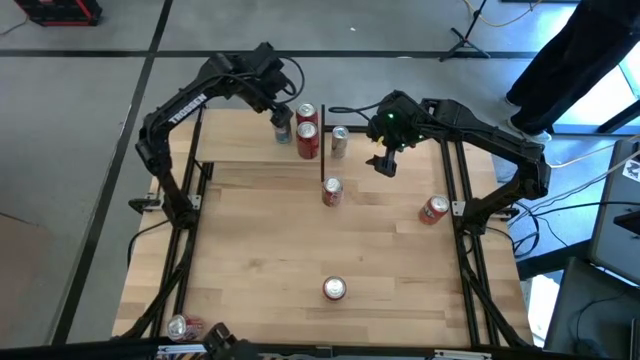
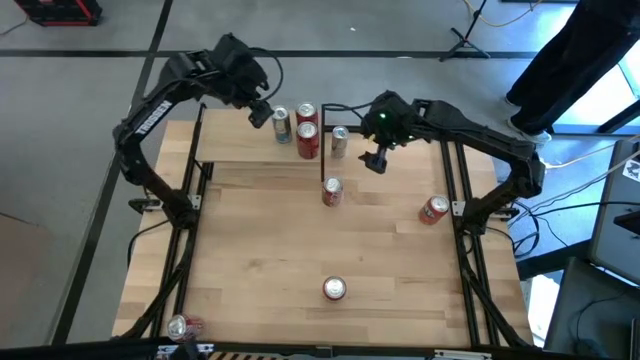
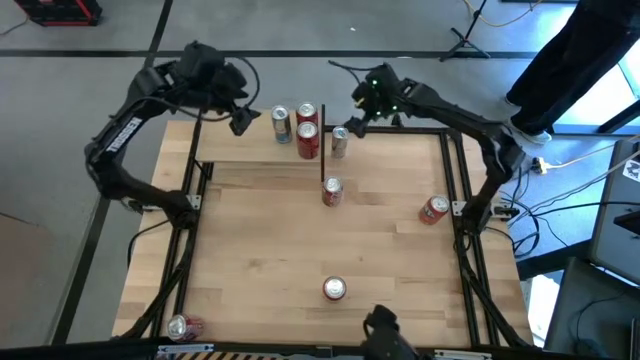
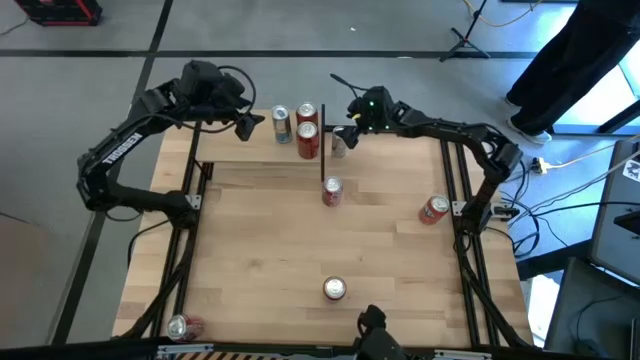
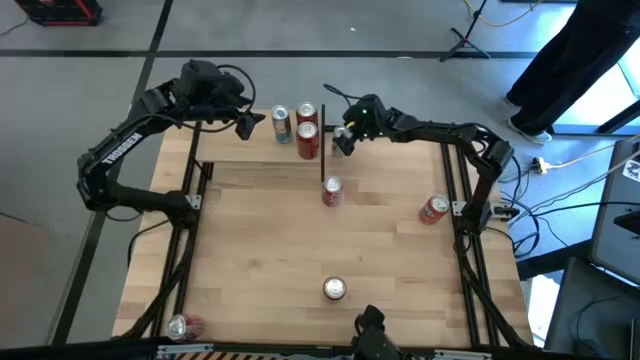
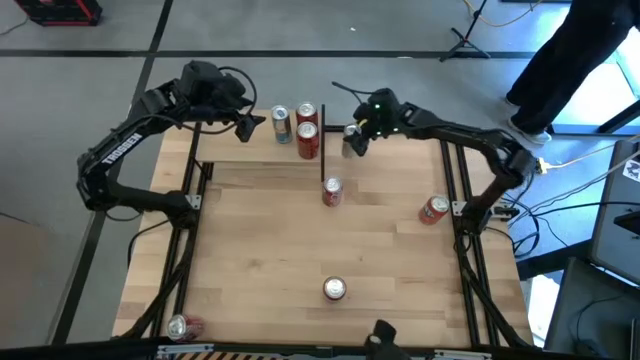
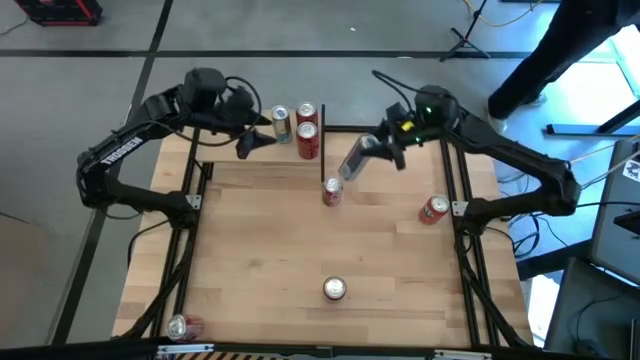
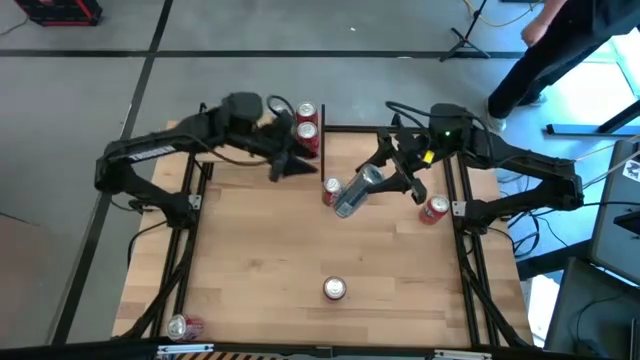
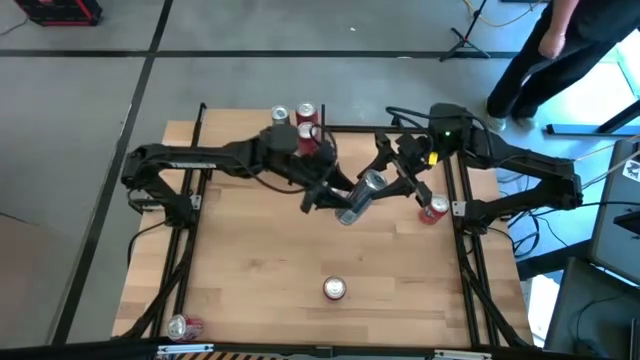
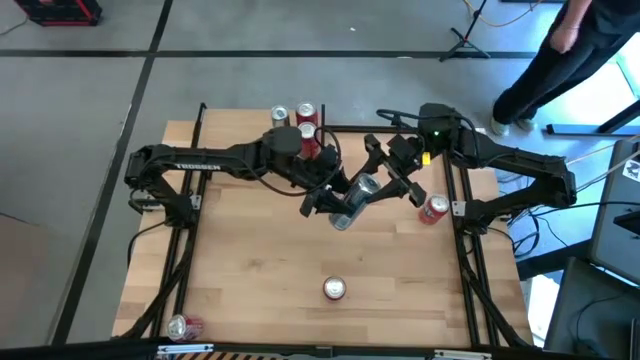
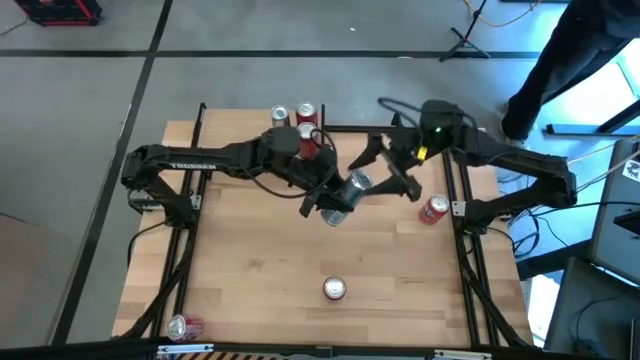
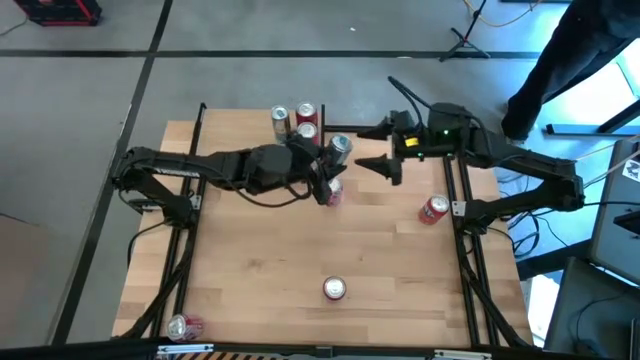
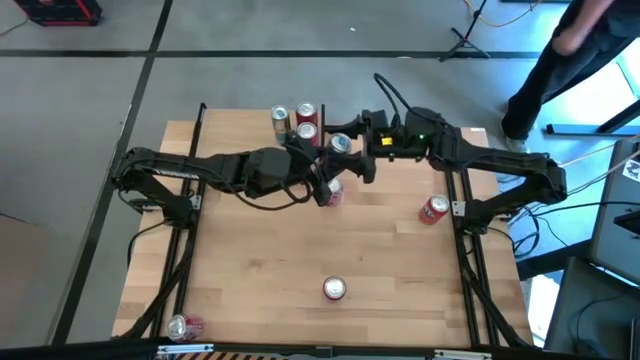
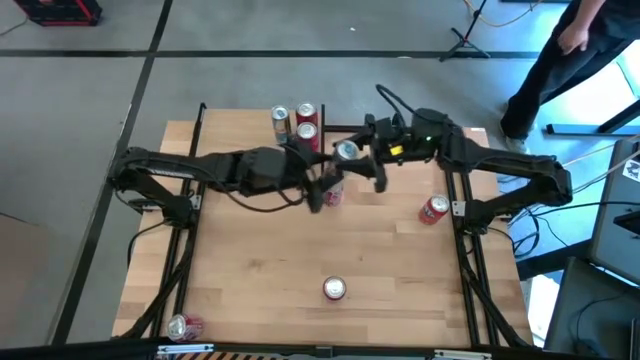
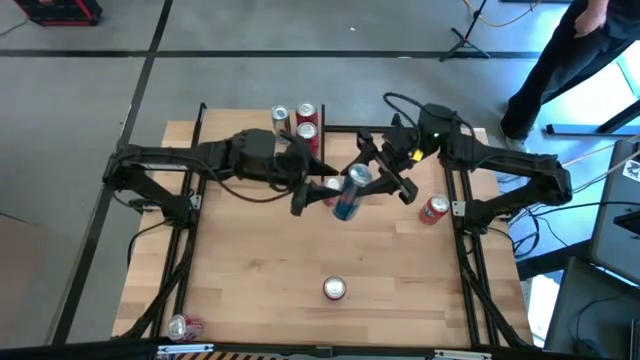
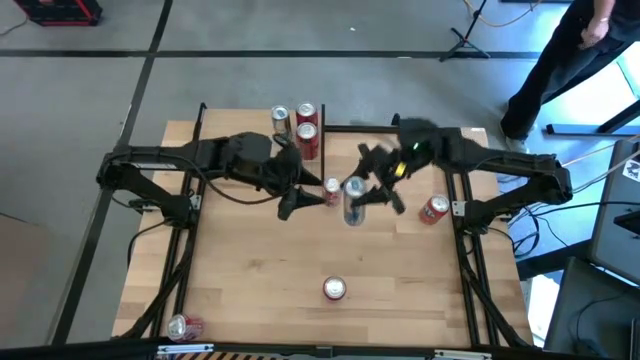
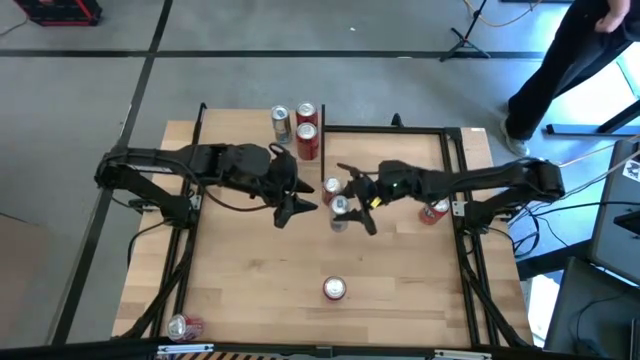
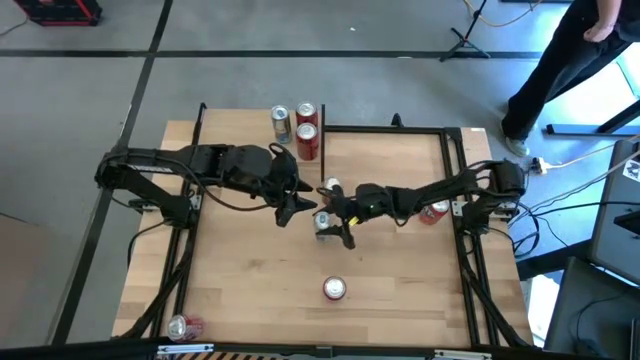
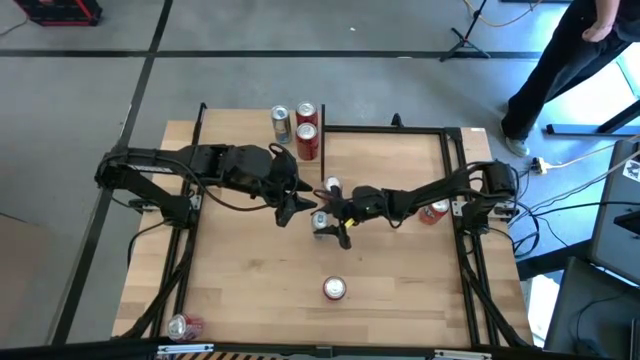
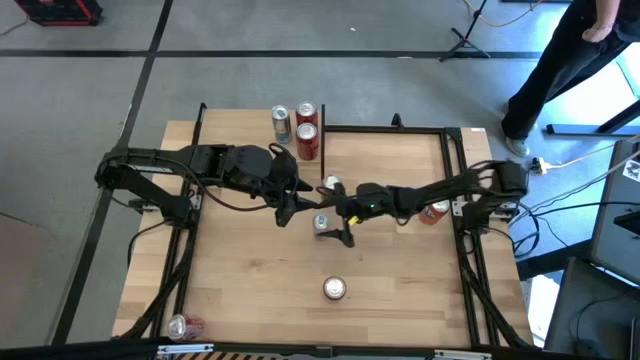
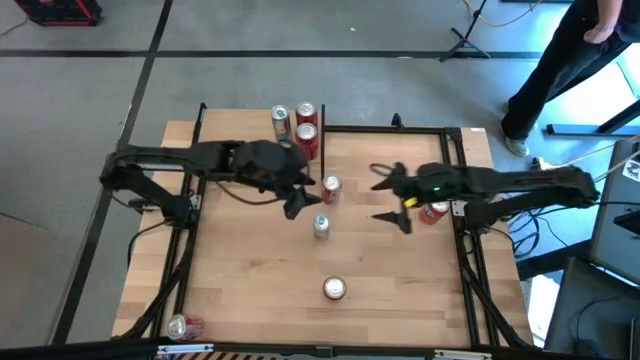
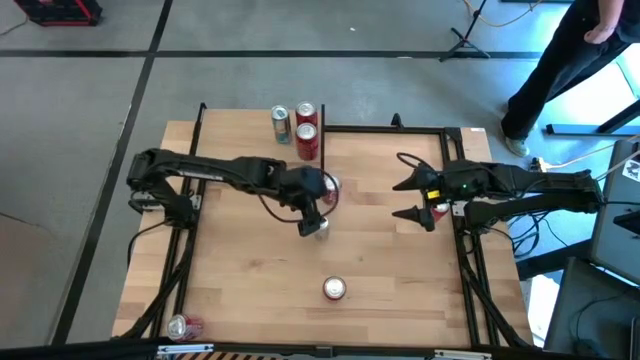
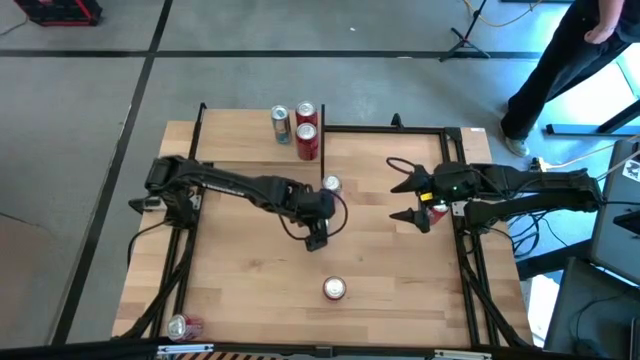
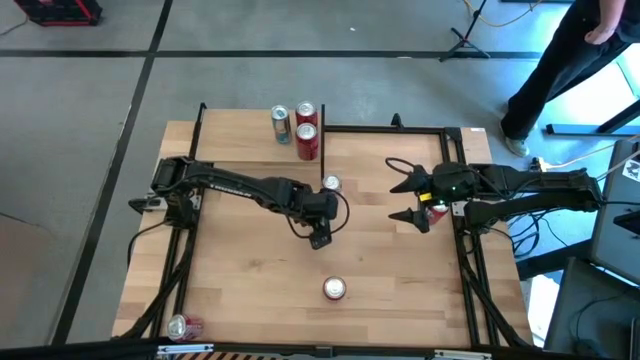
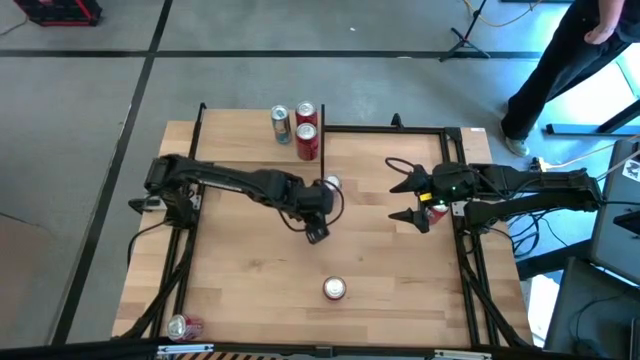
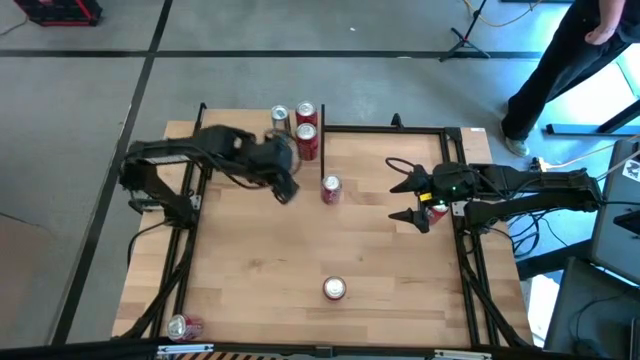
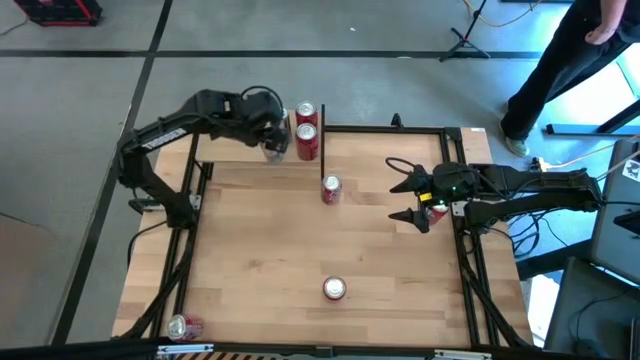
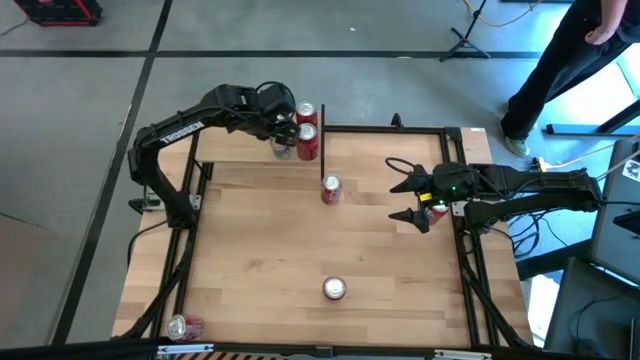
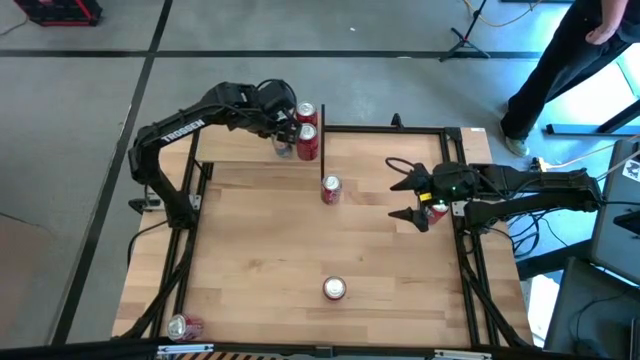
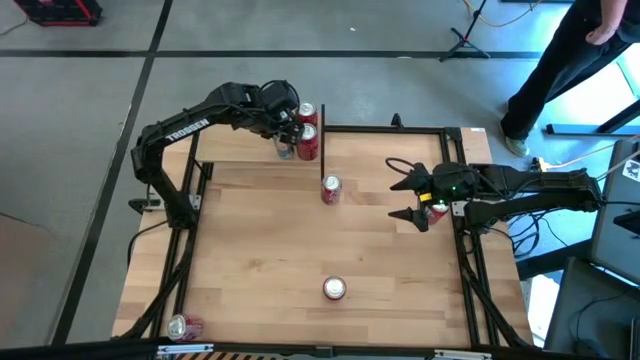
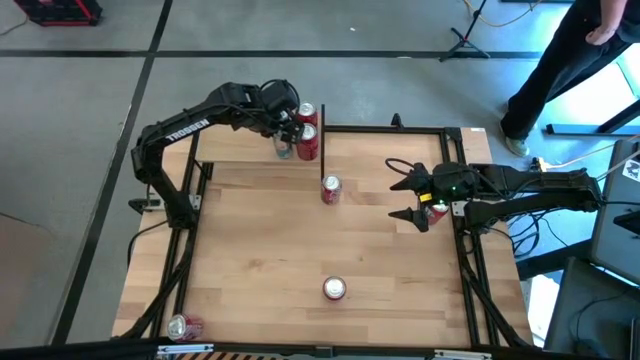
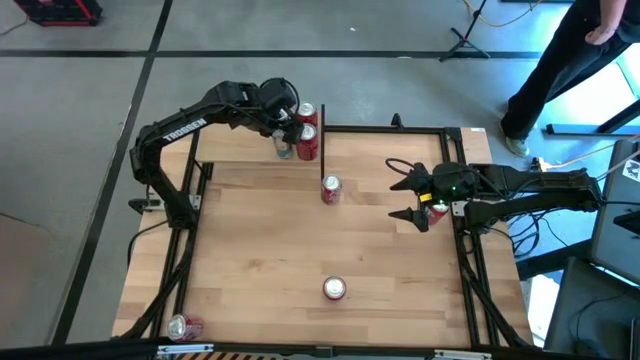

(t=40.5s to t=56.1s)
Task: Place canned beverage on shelf
Put the blue soda can on the shelf and aligned with the other blue soda can

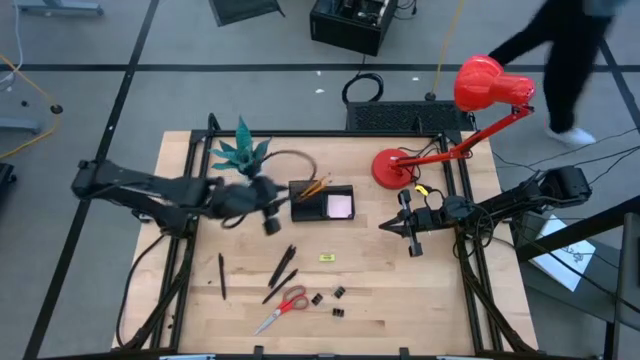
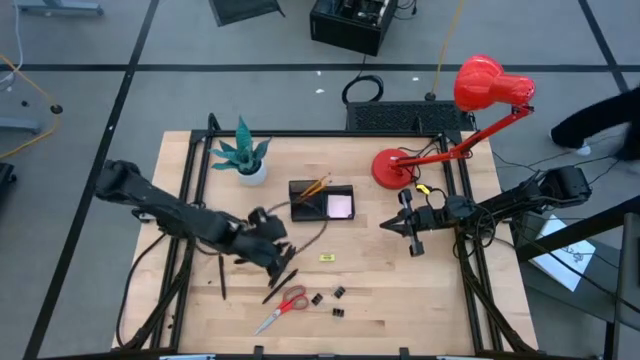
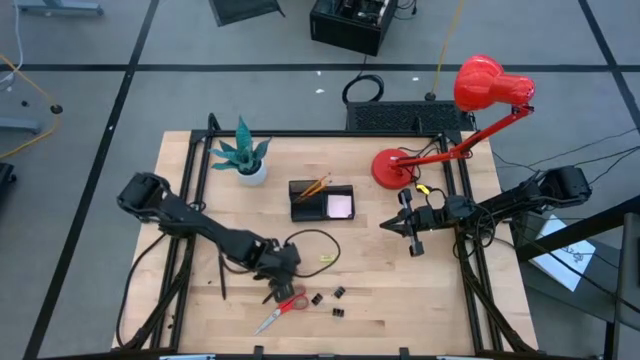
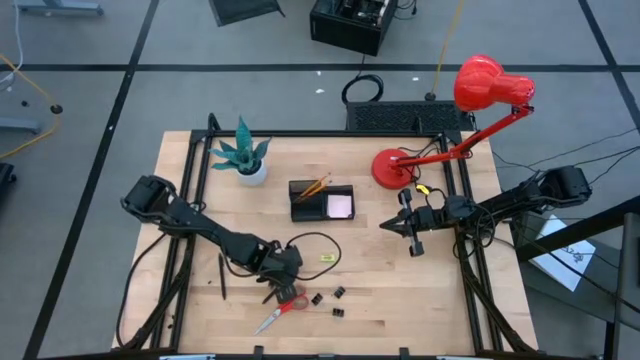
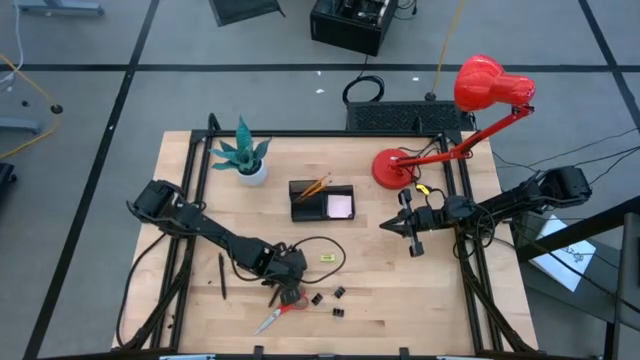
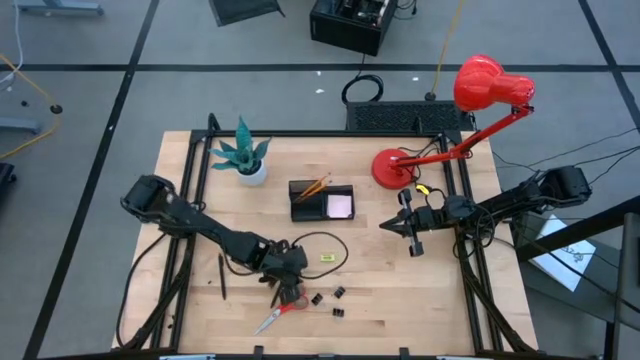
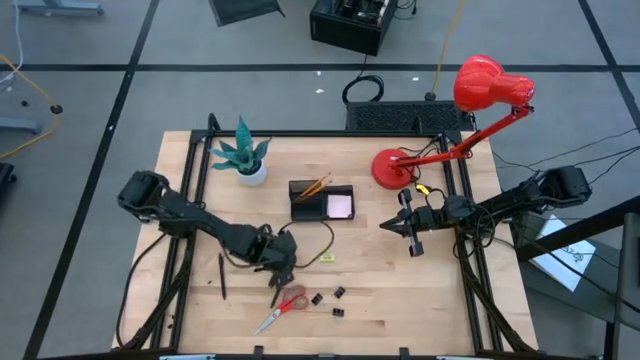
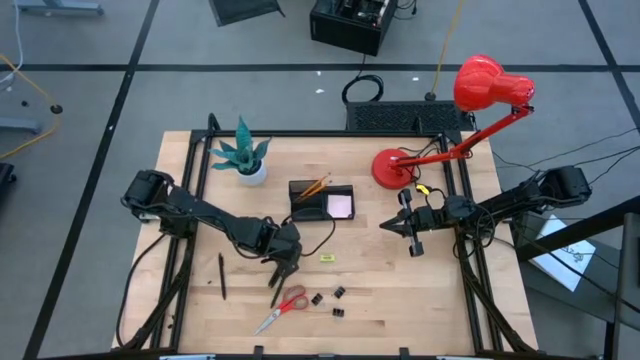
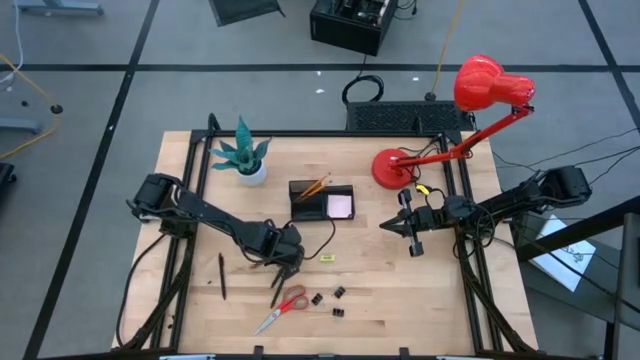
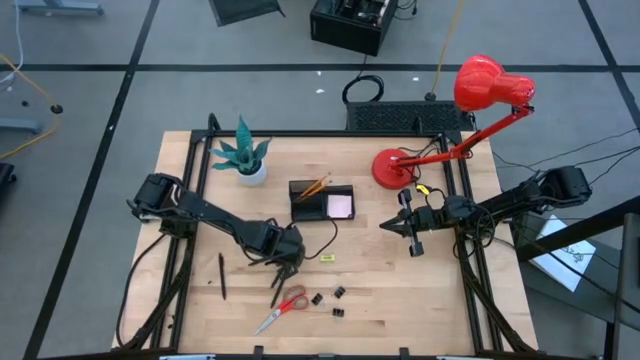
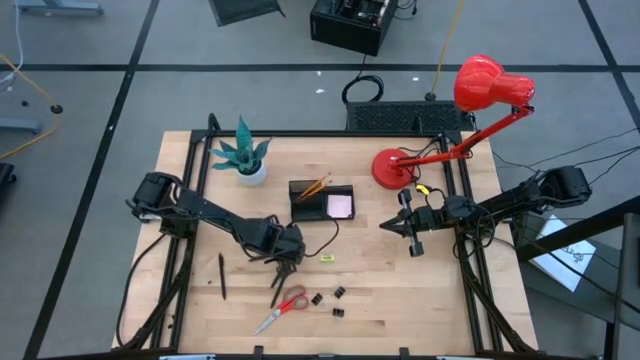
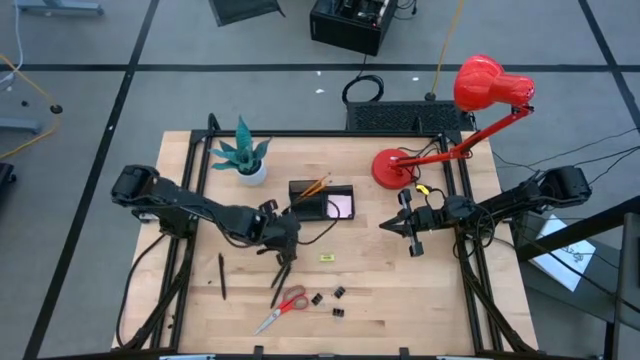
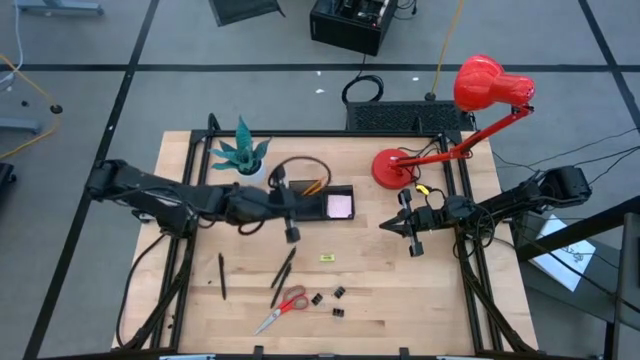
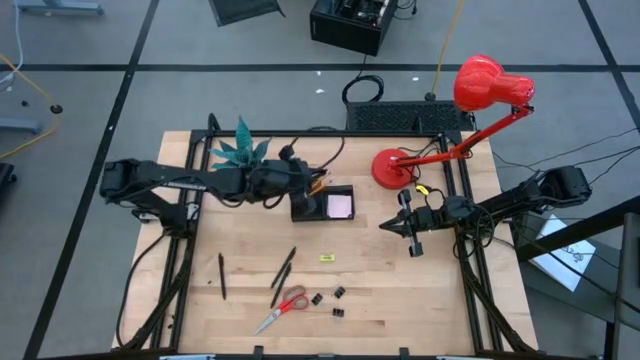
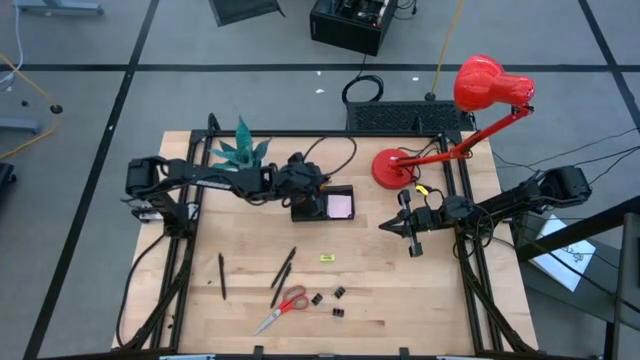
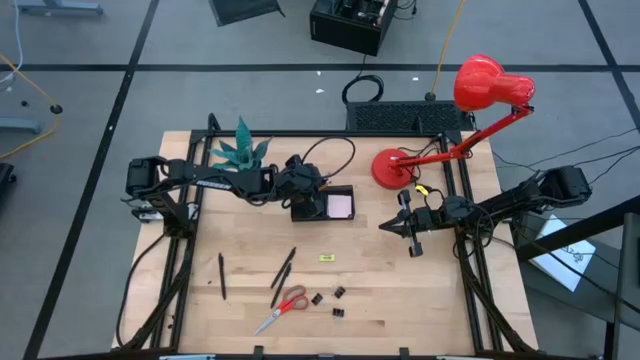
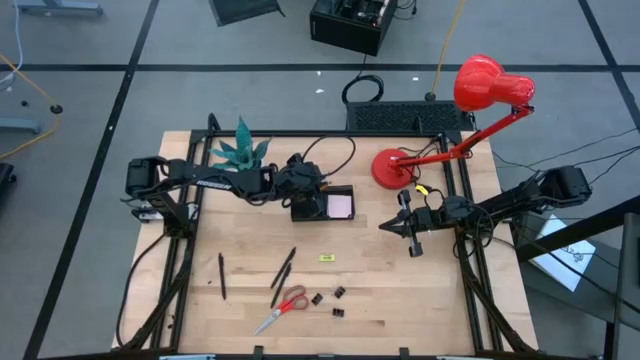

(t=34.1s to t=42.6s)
Task: Pick and place office supplies into organizer
Put the black pen into the black desk organizer
